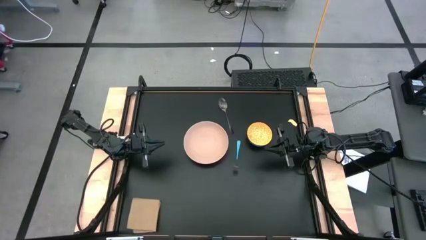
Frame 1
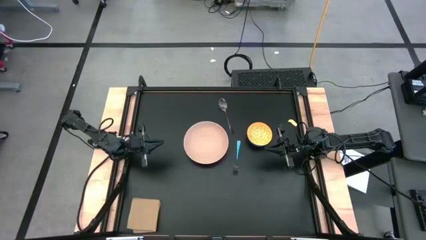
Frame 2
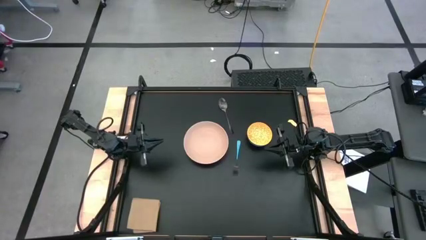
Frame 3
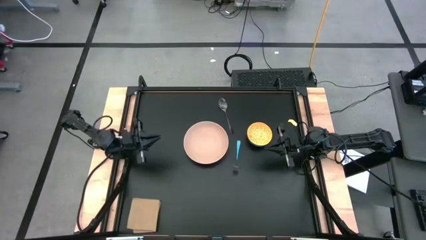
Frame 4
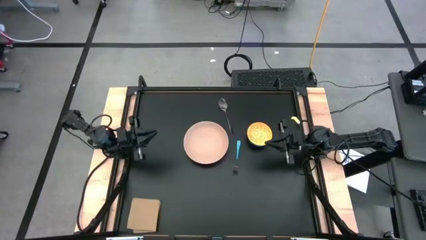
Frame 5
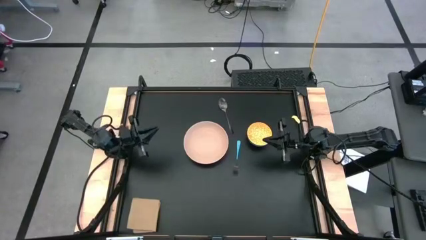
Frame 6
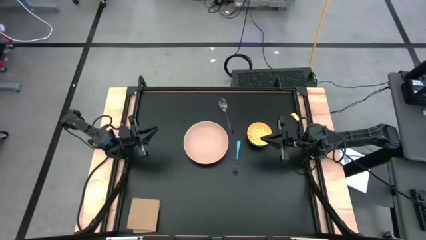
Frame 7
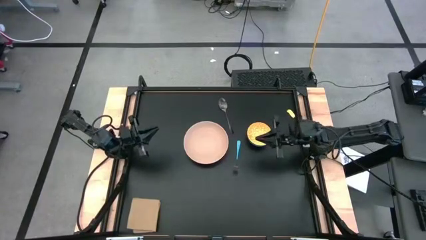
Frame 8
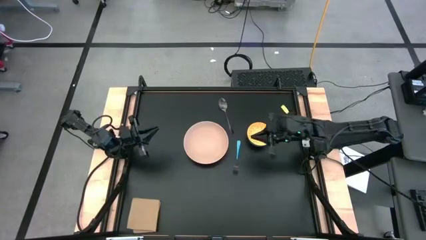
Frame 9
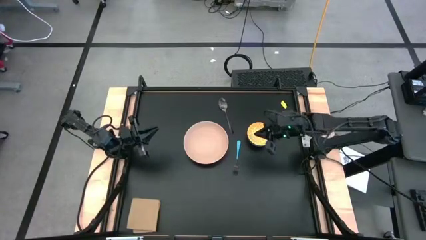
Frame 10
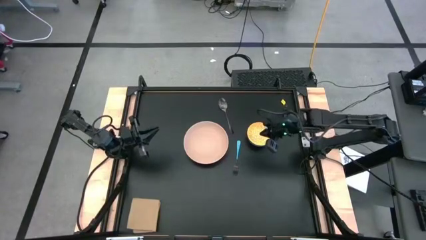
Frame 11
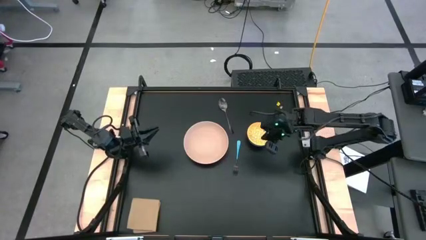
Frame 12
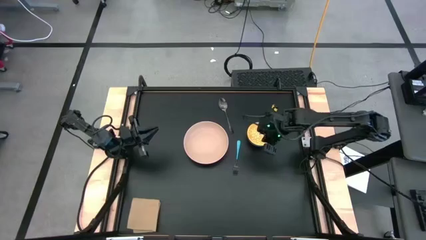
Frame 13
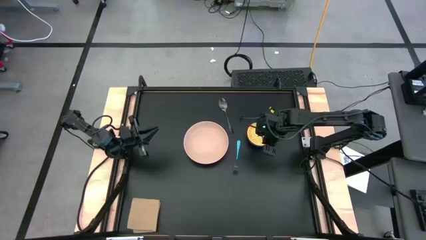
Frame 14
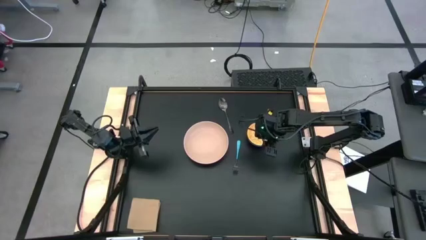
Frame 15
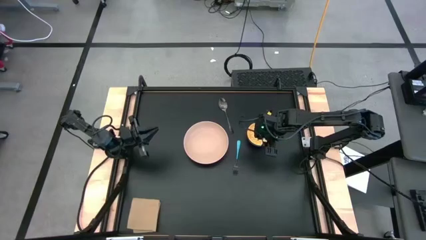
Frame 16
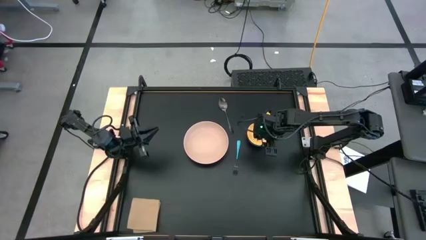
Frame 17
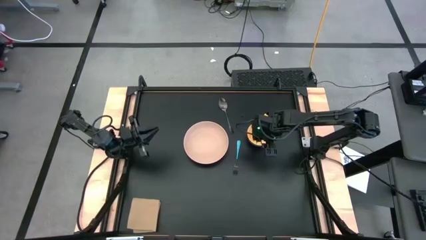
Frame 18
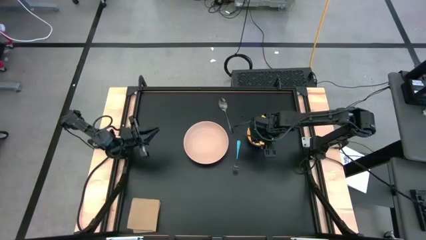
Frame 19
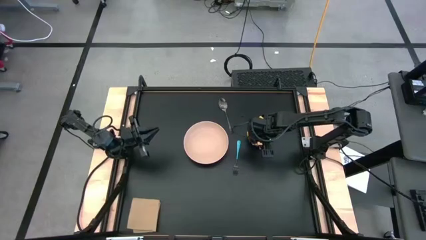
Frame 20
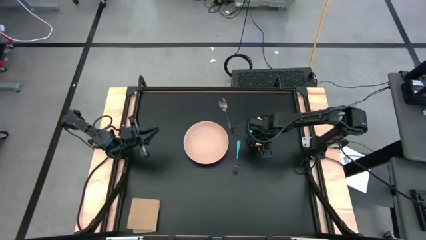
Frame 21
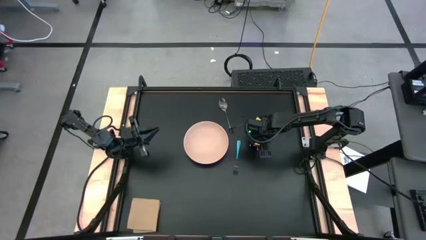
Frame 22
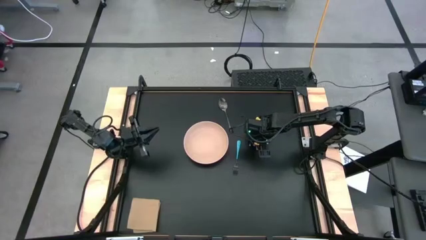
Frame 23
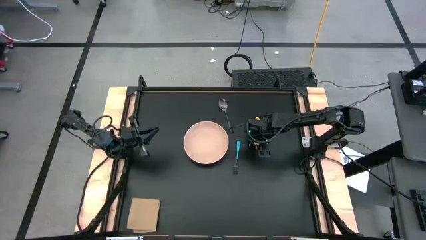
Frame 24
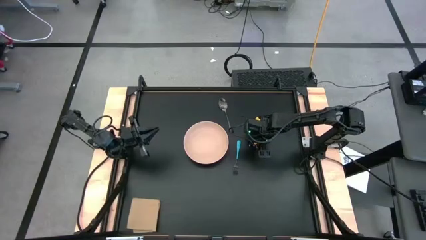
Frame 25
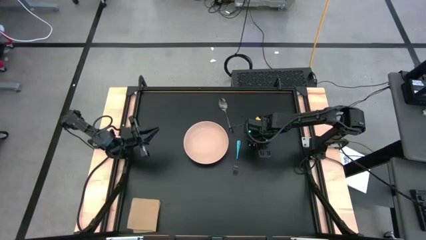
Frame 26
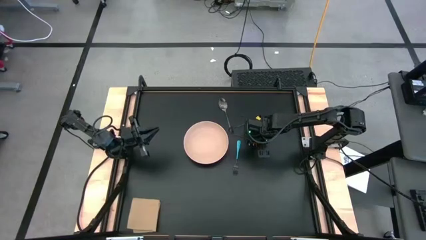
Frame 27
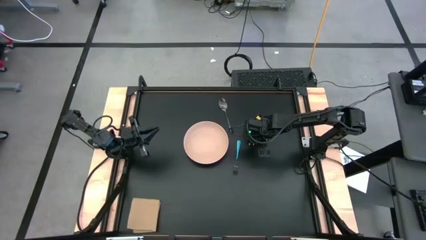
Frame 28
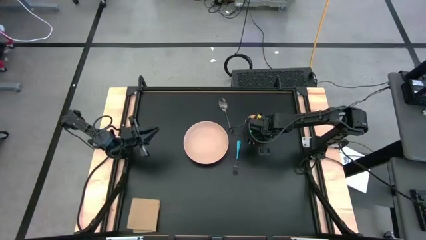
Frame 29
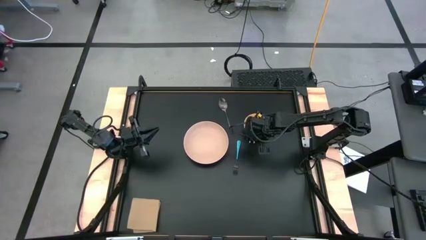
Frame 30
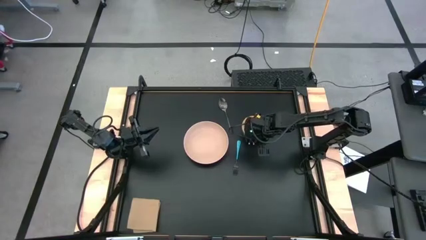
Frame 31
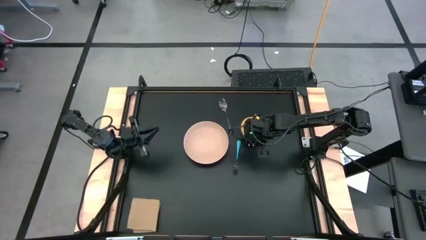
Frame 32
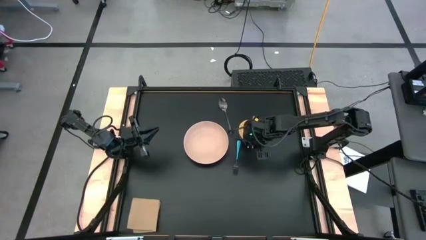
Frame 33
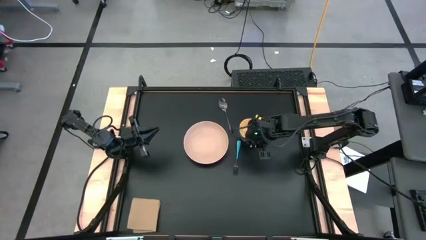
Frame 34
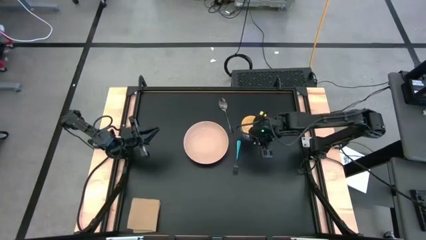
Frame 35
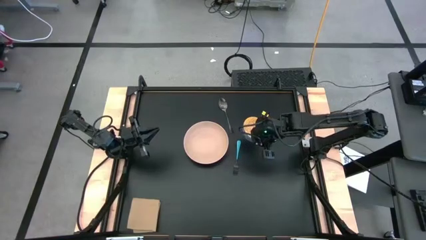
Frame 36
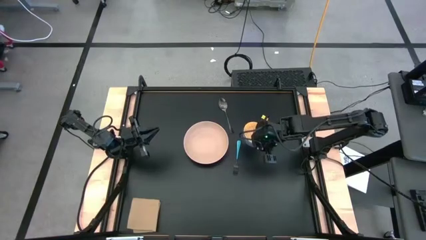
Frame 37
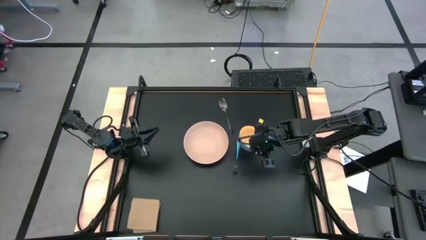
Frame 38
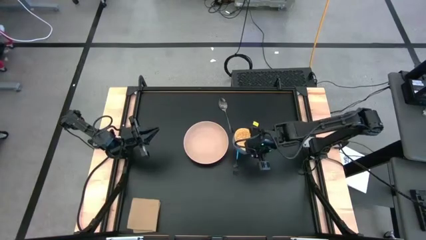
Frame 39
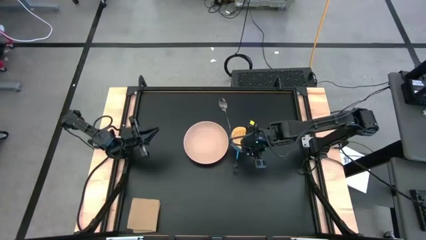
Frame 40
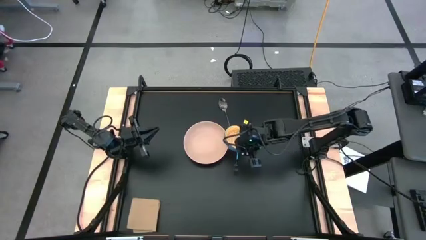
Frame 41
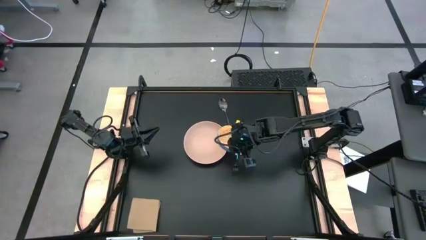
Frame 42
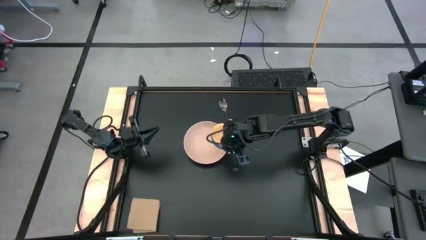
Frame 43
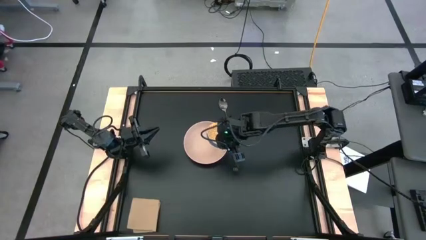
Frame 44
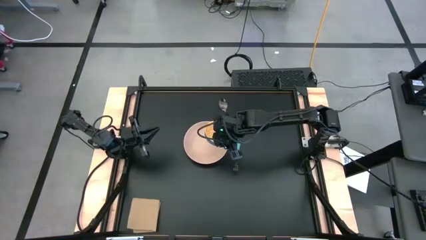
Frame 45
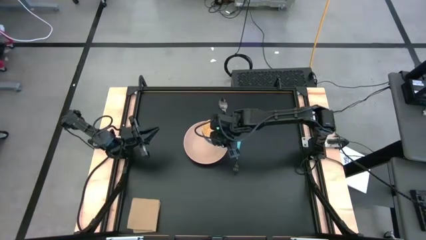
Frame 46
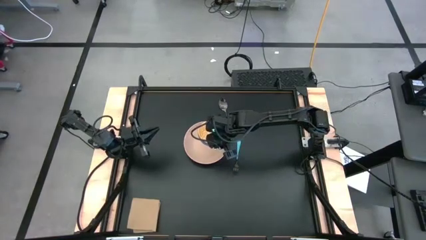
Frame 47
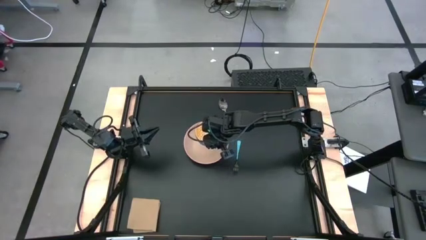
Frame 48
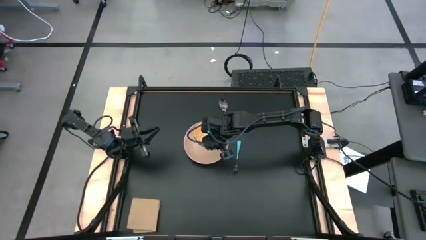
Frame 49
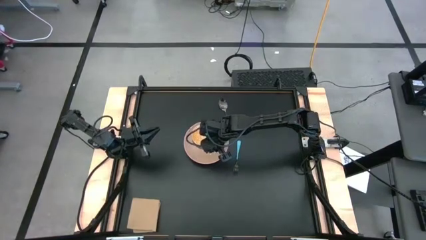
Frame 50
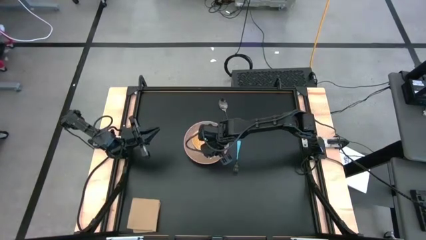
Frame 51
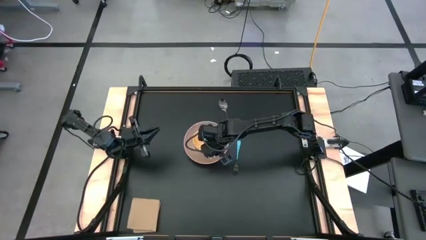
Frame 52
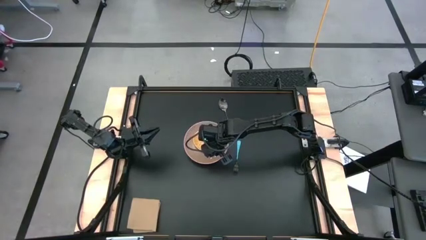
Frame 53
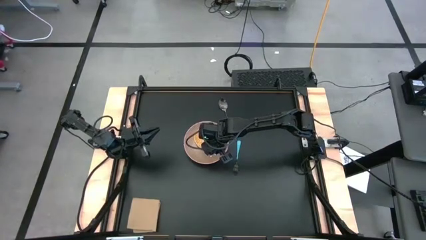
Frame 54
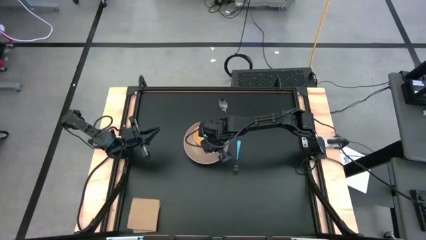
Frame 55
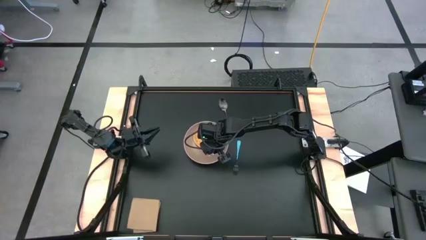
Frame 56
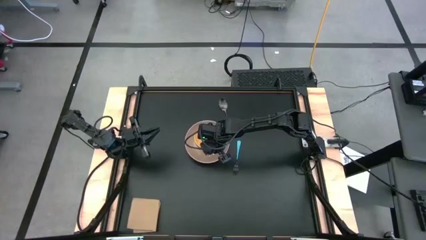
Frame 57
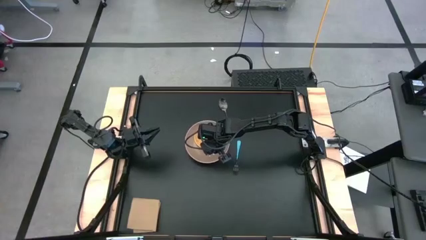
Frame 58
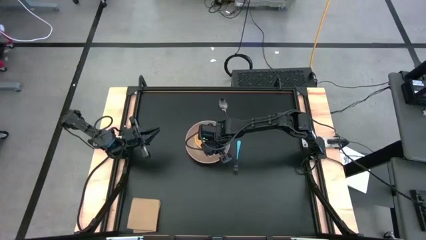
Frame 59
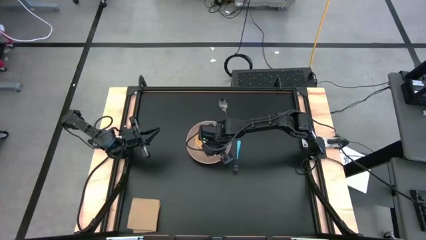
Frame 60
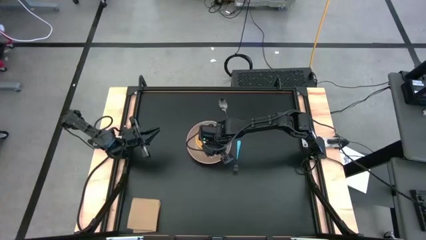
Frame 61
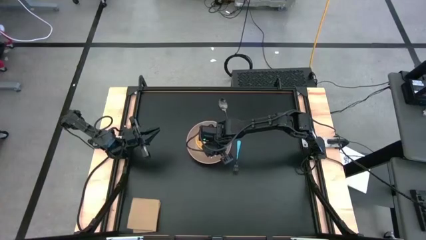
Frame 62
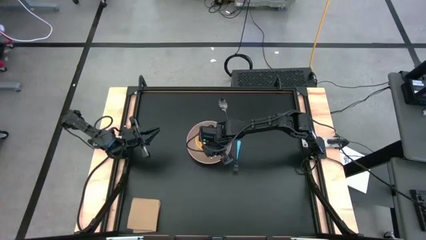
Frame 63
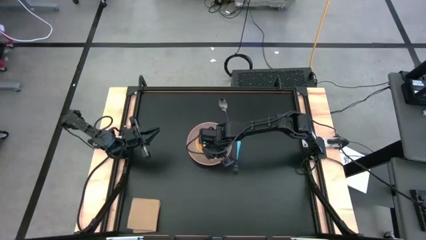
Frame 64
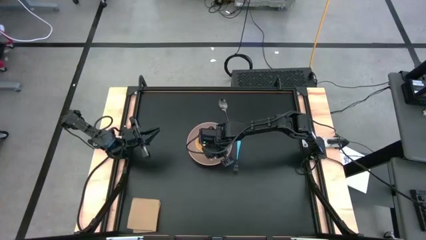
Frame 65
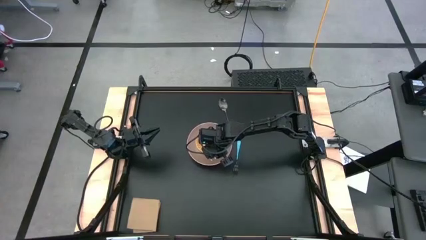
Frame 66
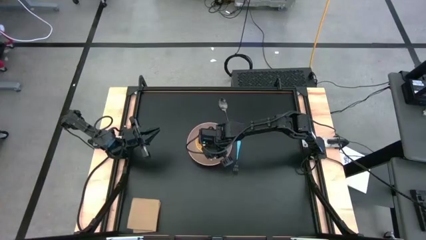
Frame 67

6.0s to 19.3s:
Task: Set table place
Put the yellow bowl on top of the white plate
